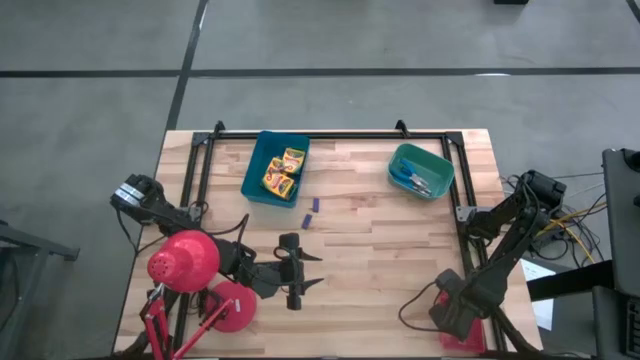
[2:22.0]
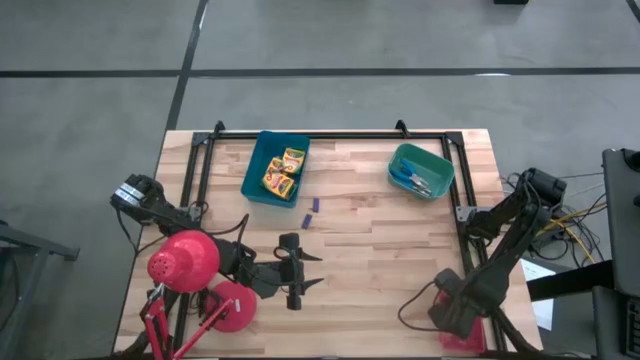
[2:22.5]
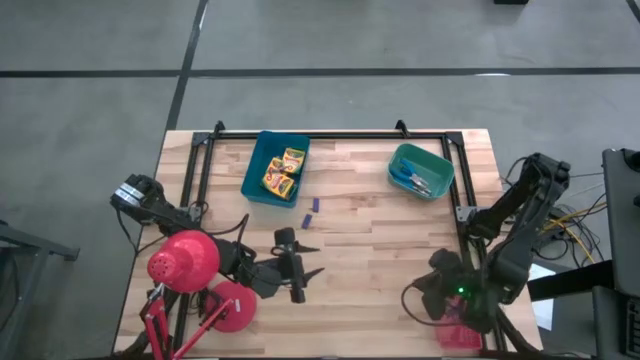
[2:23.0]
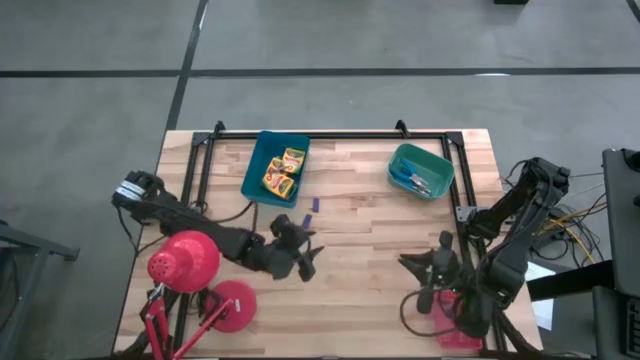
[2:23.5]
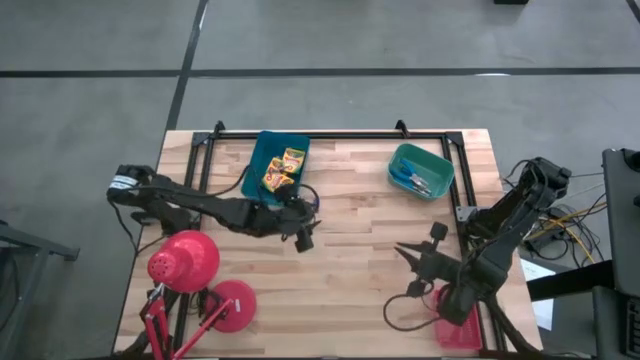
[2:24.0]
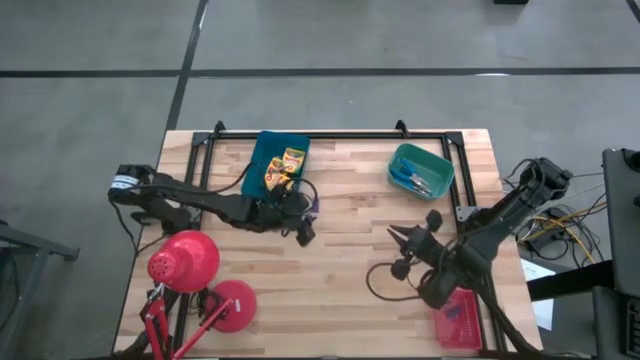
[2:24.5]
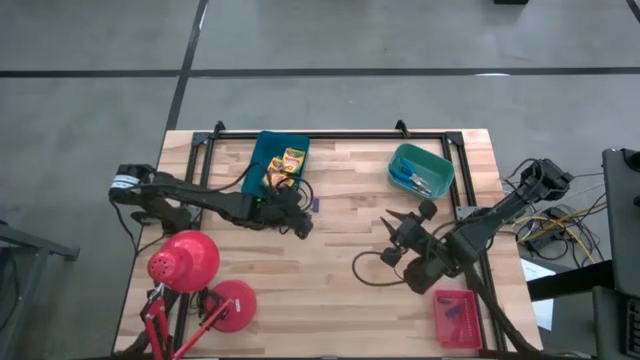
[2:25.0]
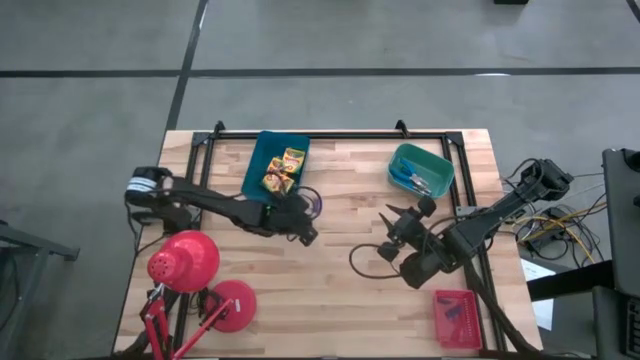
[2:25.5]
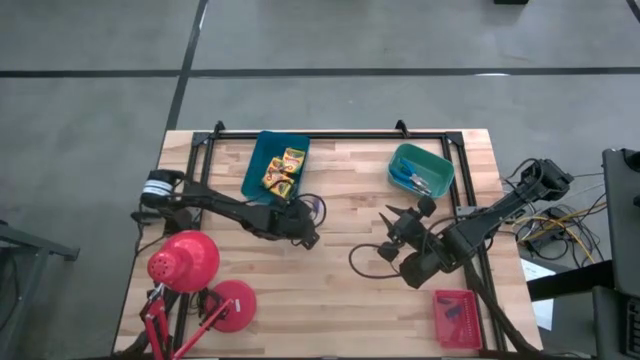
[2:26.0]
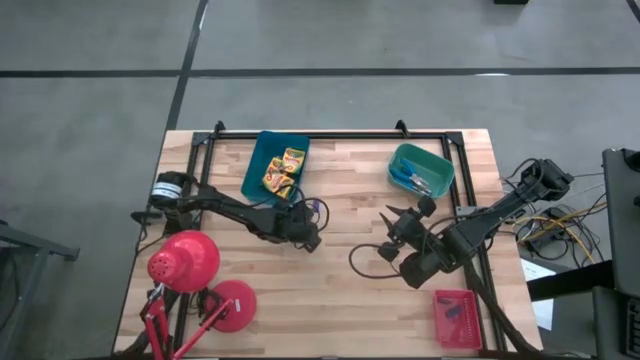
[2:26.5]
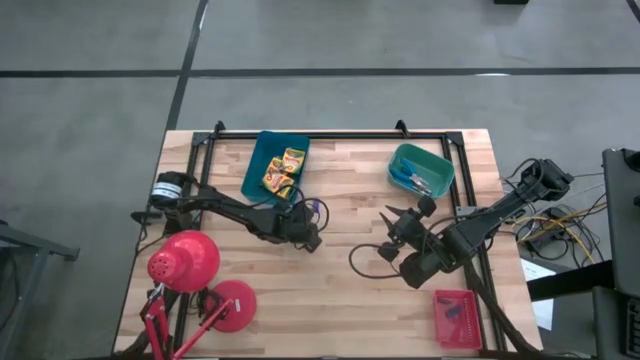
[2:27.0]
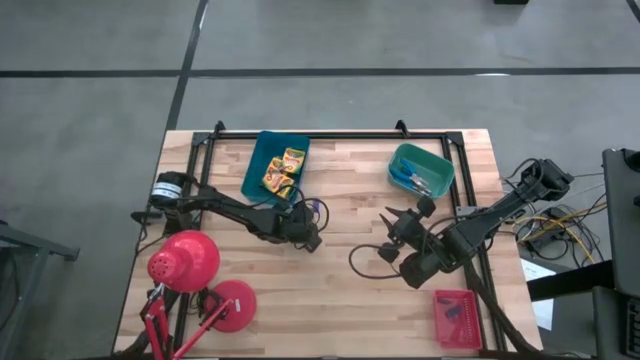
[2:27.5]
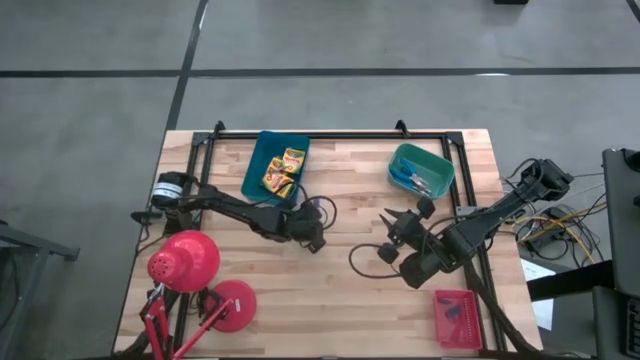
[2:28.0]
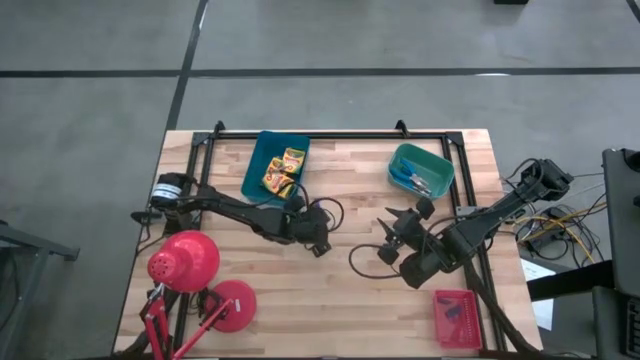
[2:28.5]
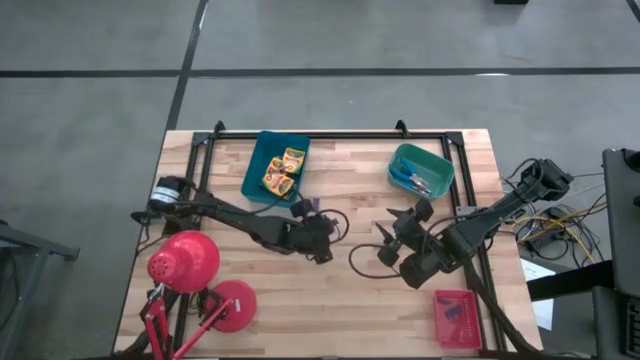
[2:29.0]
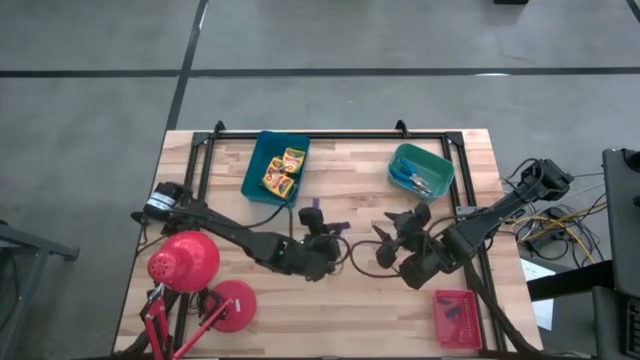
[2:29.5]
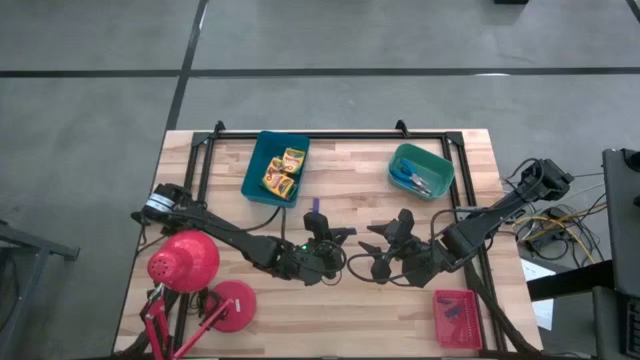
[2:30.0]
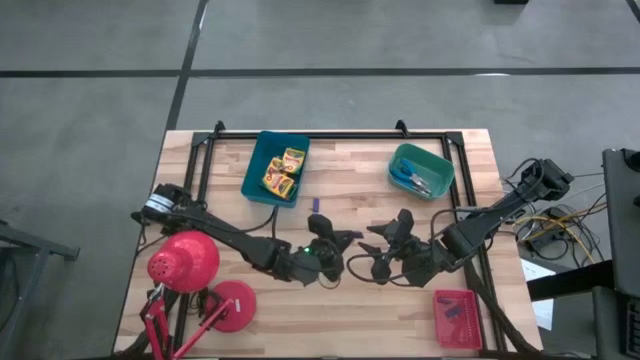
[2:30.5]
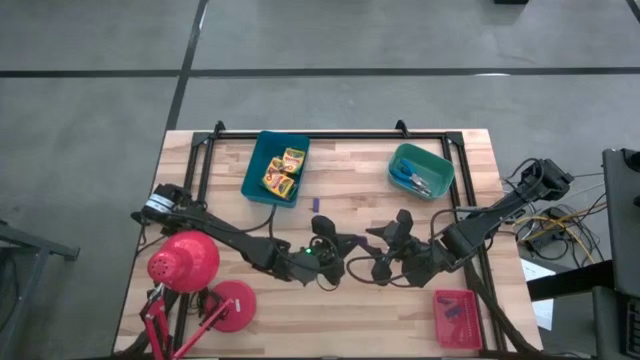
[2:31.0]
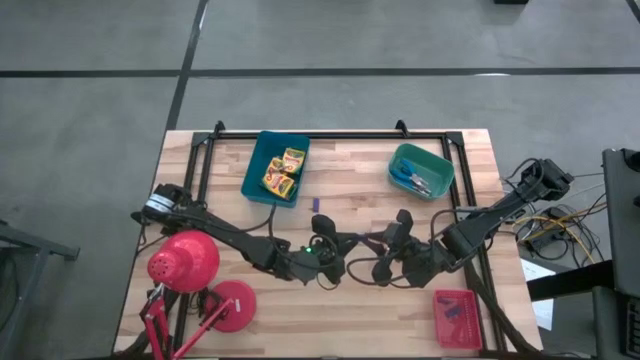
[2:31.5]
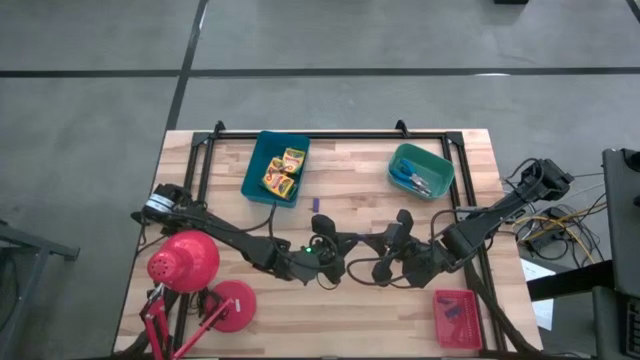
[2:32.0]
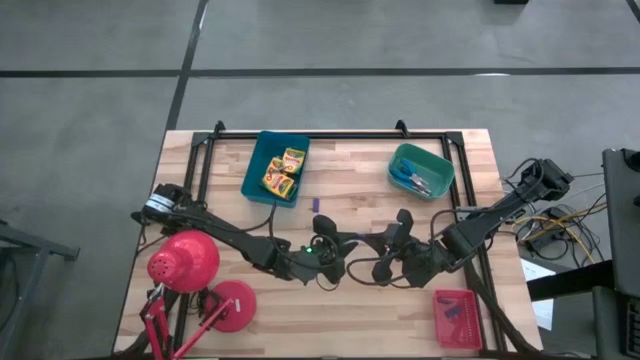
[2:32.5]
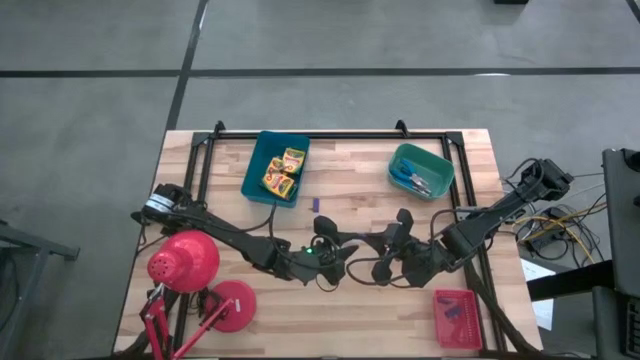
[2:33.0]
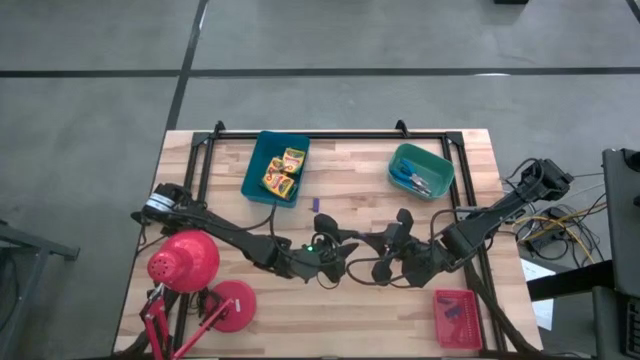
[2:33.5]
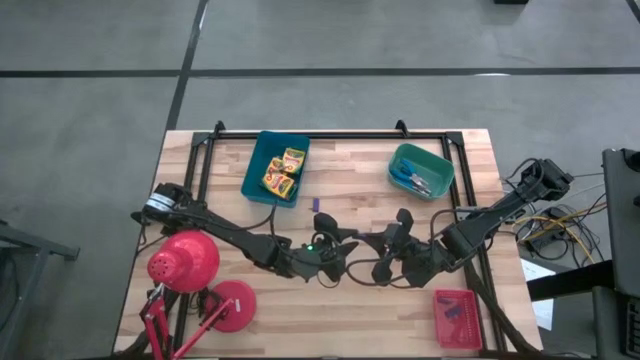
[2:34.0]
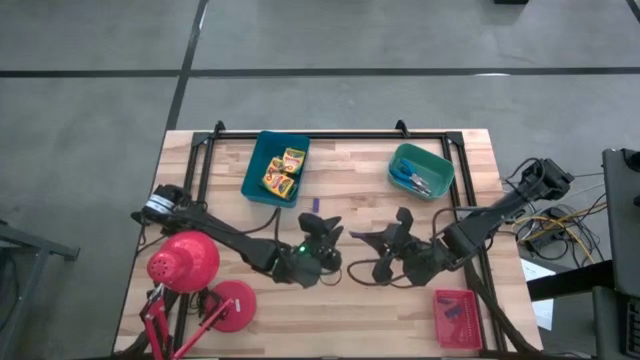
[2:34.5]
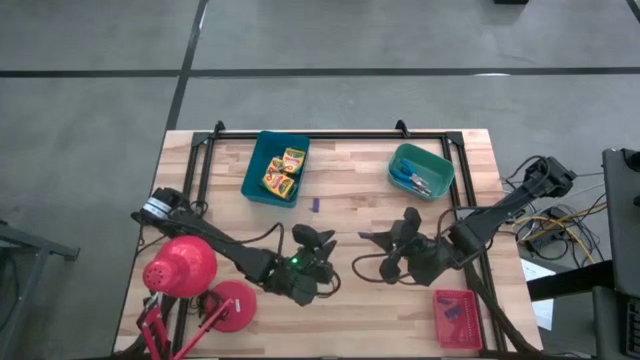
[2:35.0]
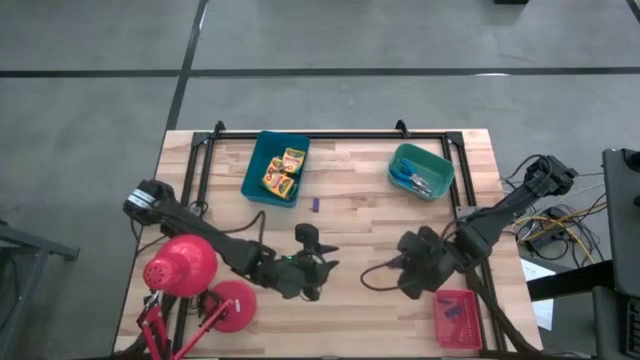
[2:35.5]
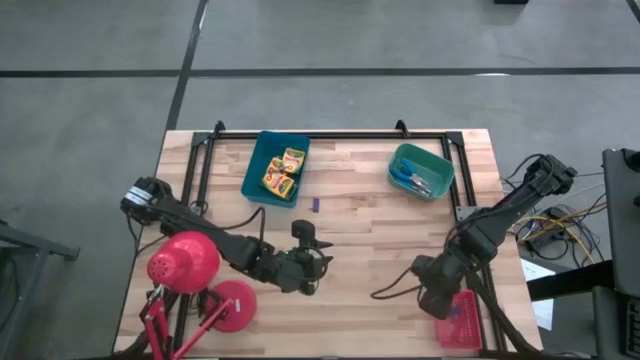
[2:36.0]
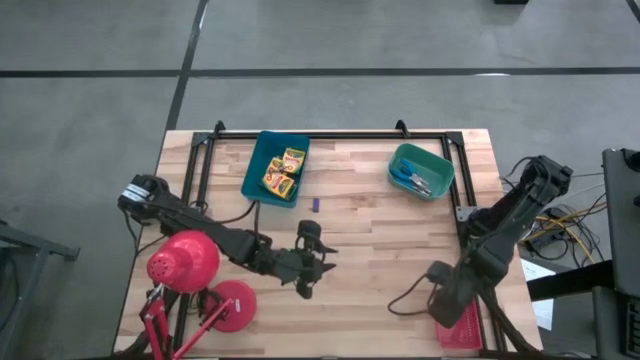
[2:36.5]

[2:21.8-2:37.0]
Task: Pick & Place School Supplies
Put the purple eraser into the red bin

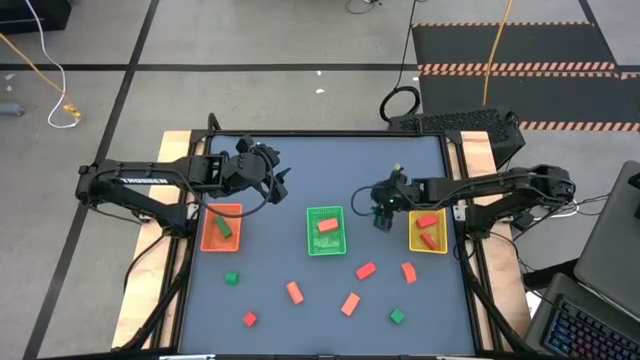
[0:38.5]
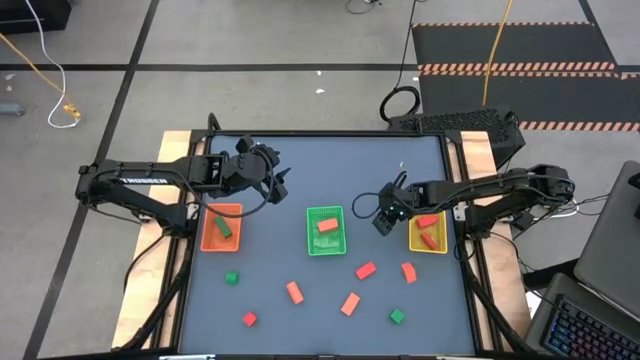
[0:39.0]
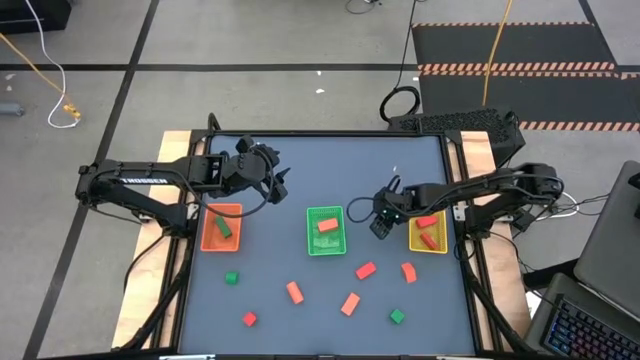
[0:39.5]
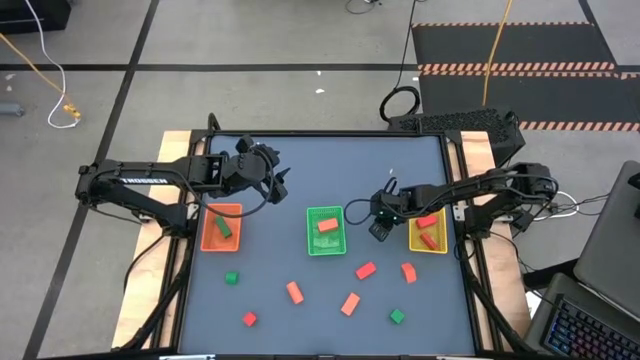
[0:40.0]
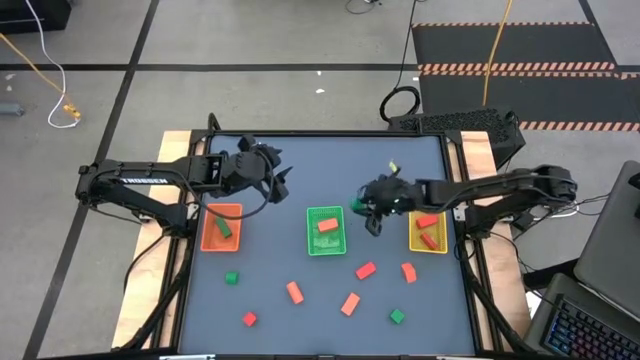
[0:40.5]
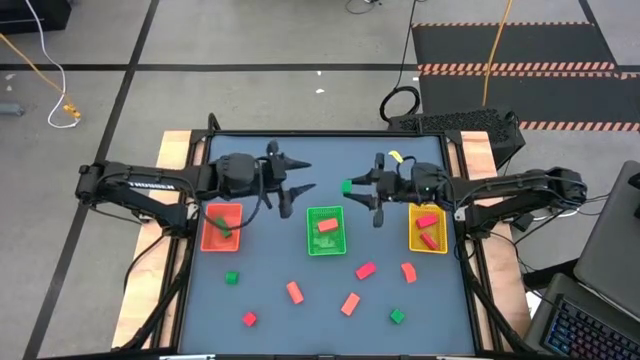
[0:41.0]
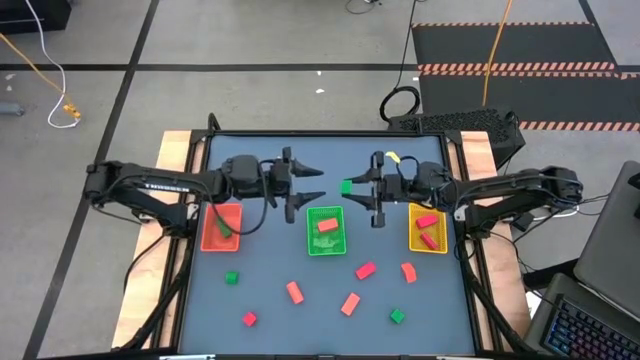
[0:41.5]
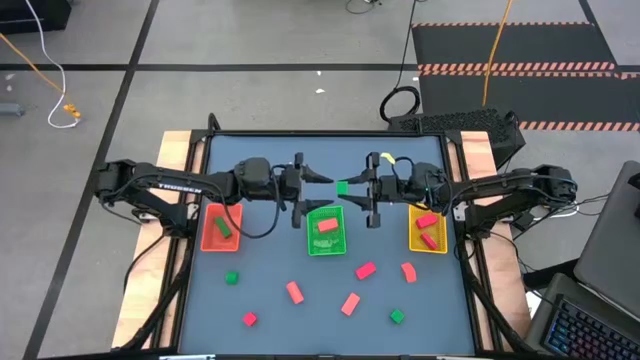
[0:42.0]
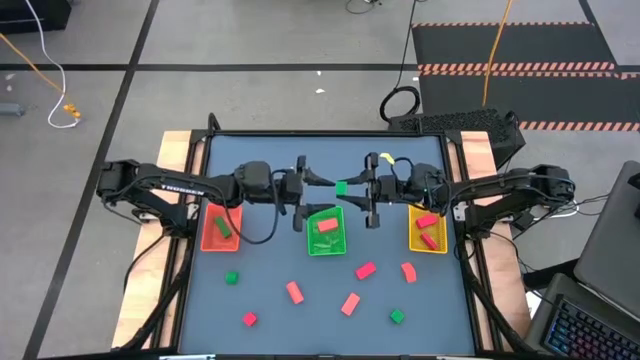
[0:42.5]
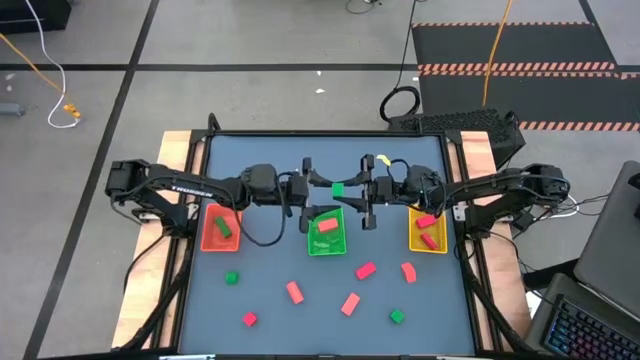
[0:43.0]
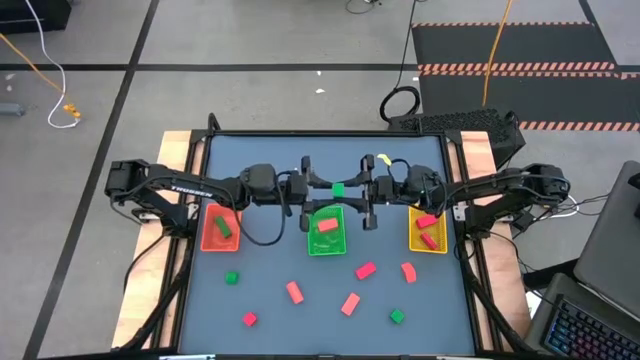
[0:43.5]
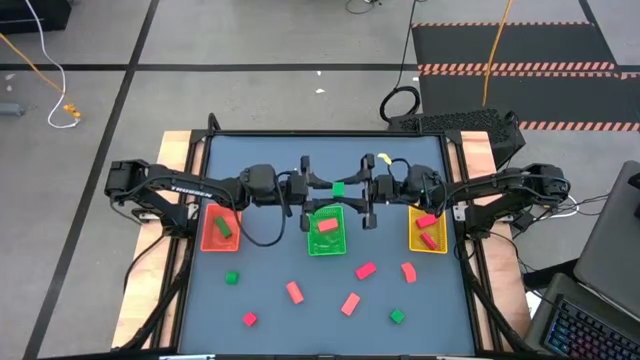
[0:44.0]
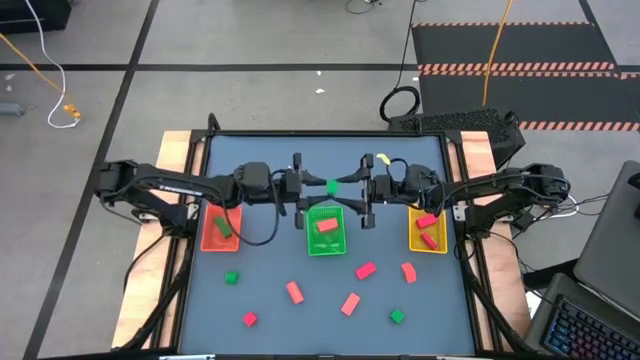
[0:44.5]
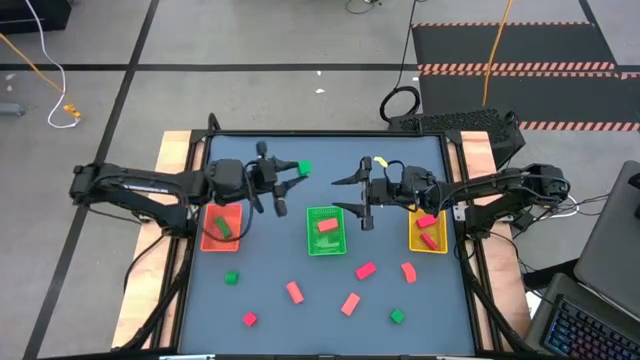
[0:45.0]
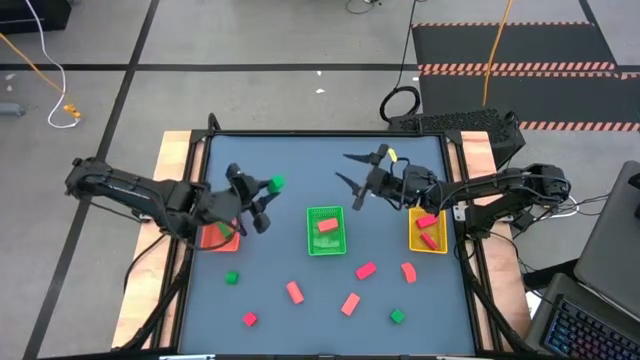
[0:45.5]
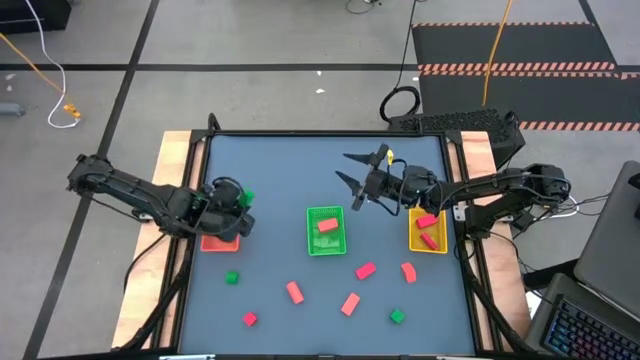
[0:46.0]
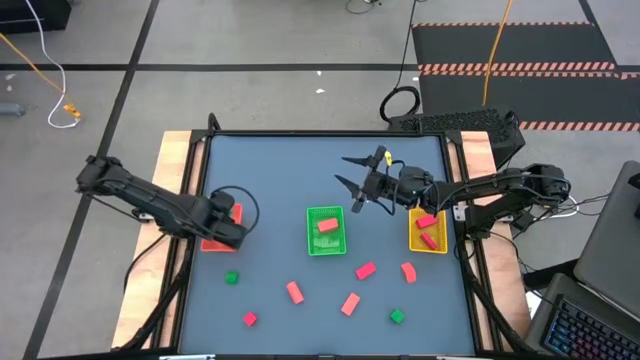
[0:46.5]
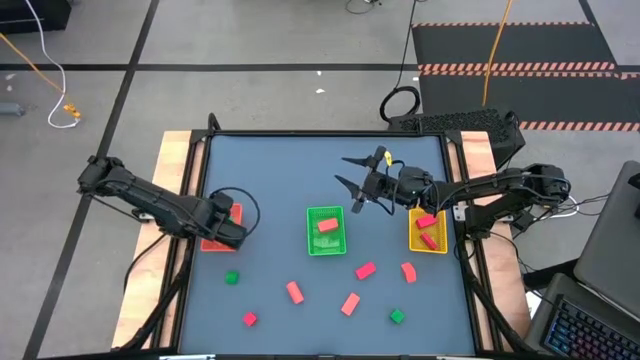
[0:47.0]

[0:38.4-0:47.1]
Task: Sort & place blocks by color
Put the green block into the orange bin
